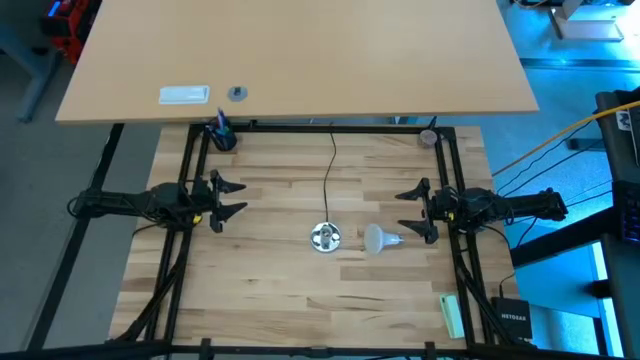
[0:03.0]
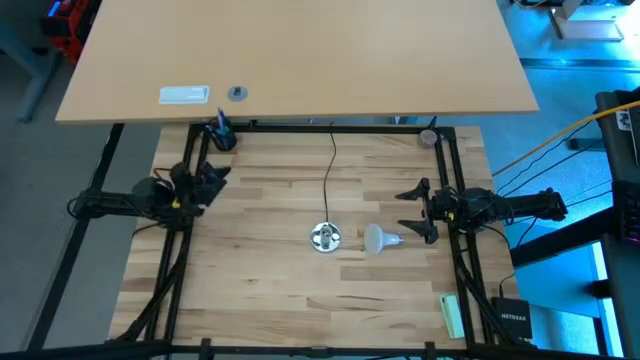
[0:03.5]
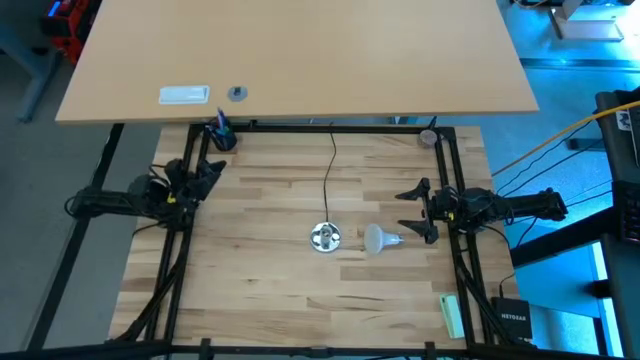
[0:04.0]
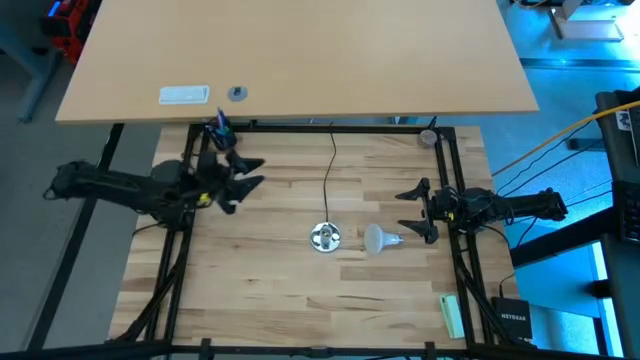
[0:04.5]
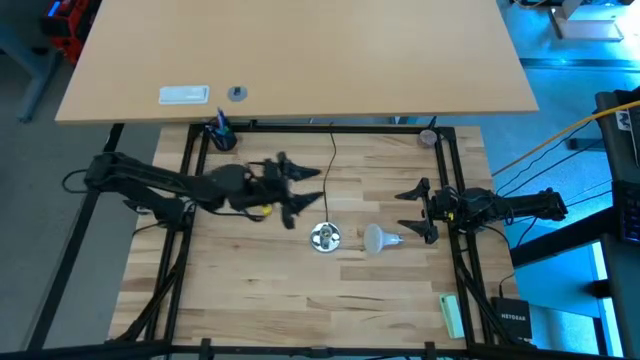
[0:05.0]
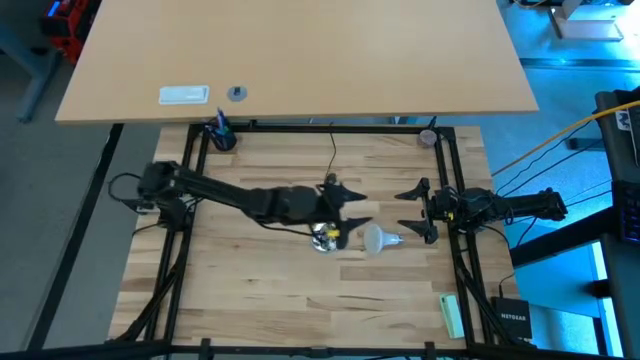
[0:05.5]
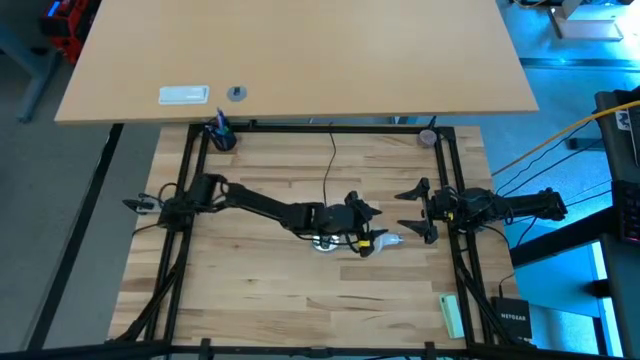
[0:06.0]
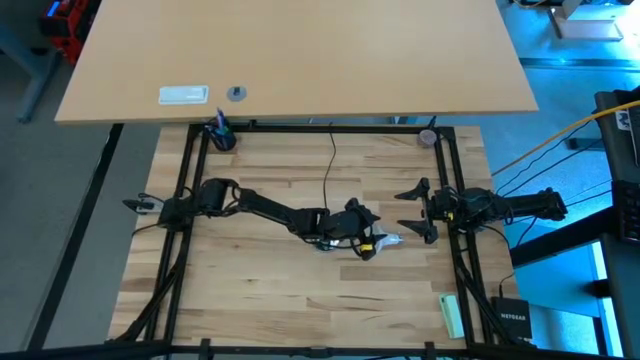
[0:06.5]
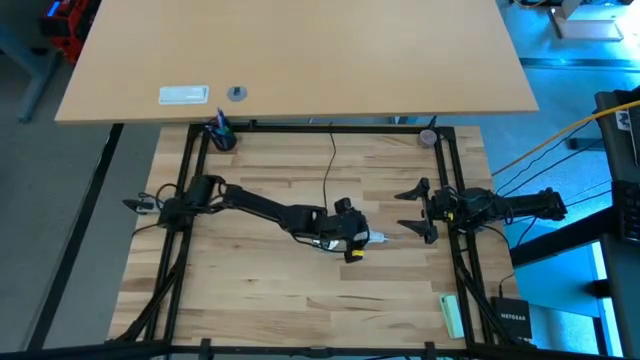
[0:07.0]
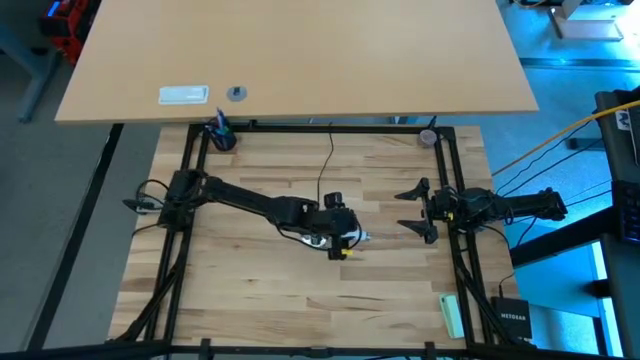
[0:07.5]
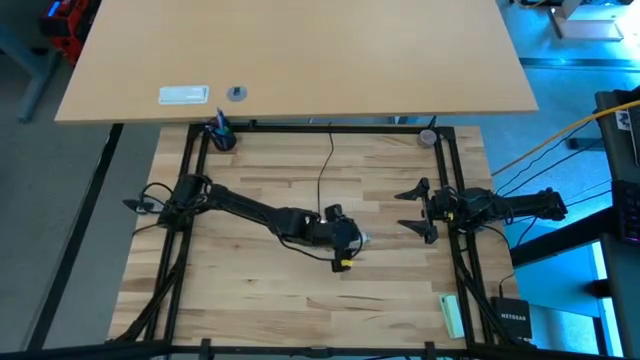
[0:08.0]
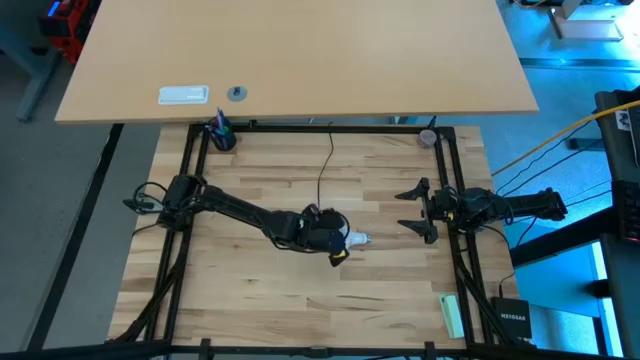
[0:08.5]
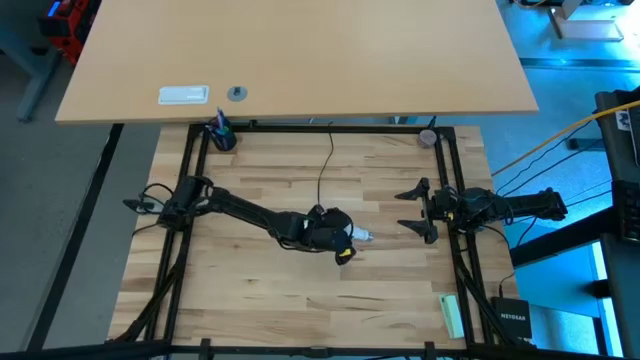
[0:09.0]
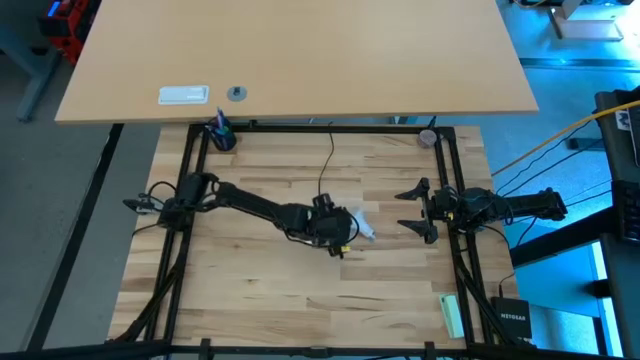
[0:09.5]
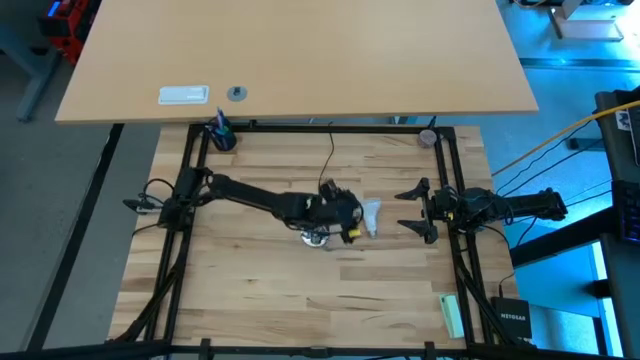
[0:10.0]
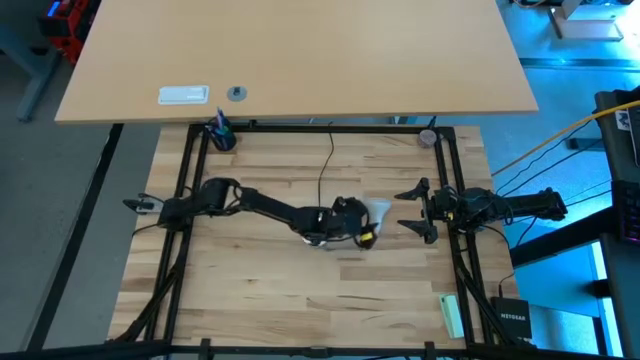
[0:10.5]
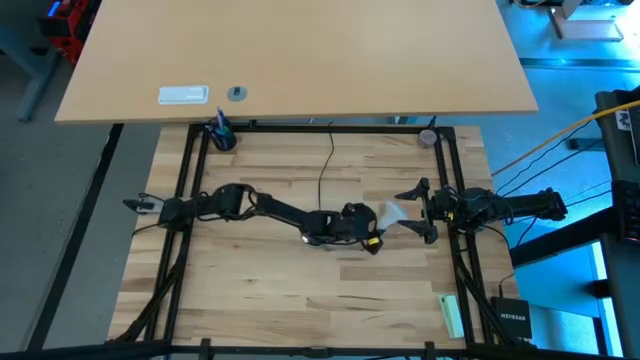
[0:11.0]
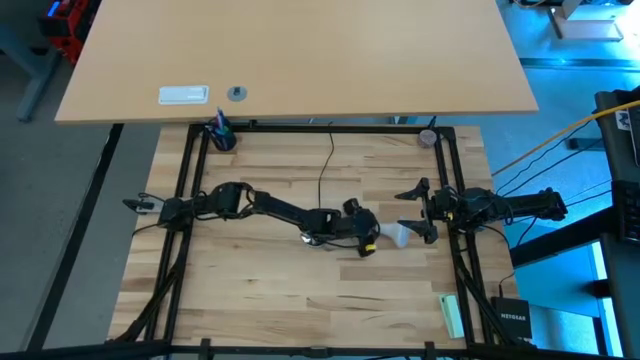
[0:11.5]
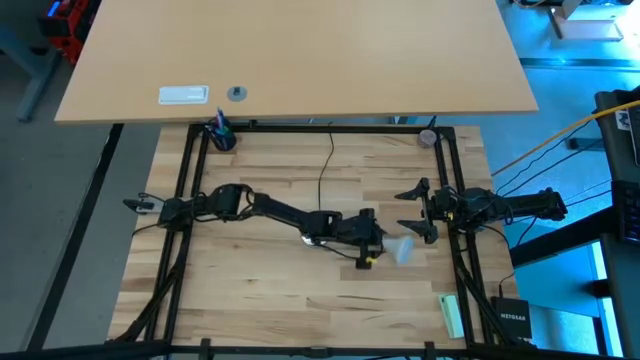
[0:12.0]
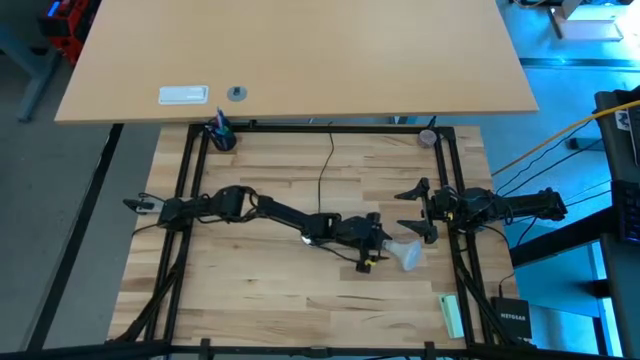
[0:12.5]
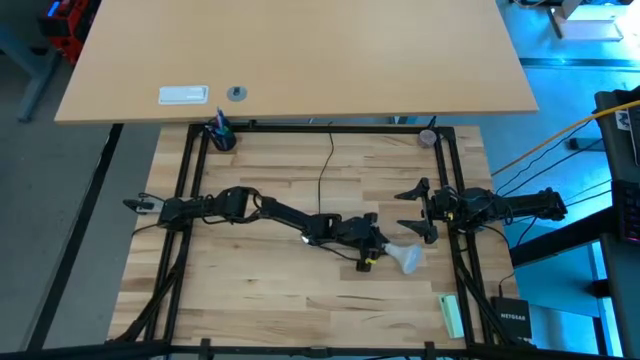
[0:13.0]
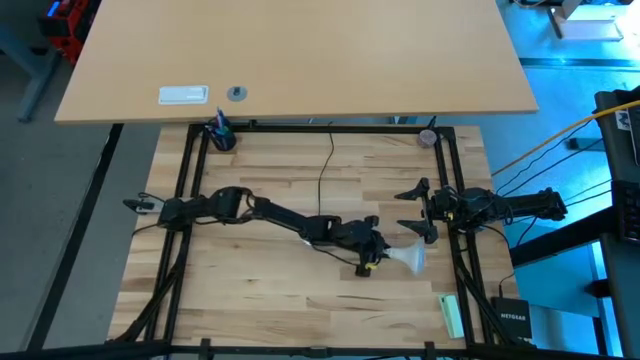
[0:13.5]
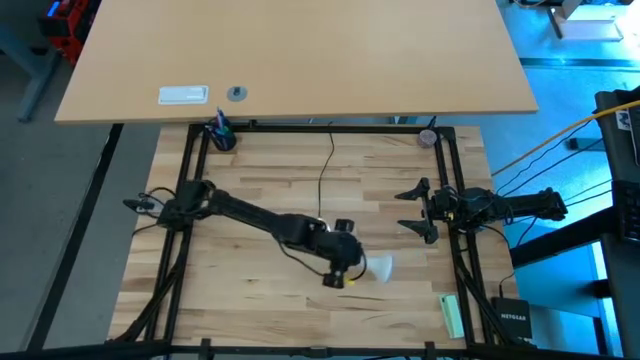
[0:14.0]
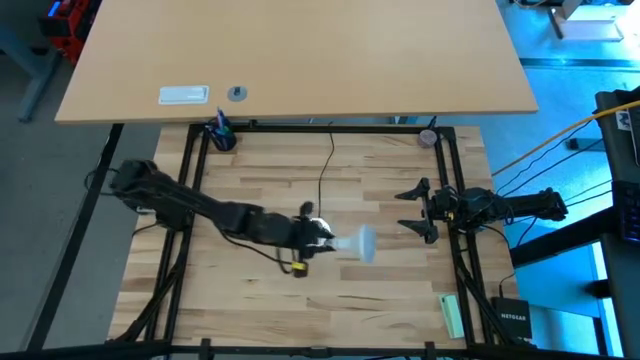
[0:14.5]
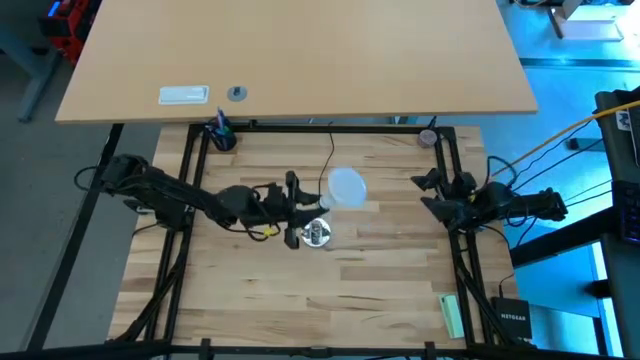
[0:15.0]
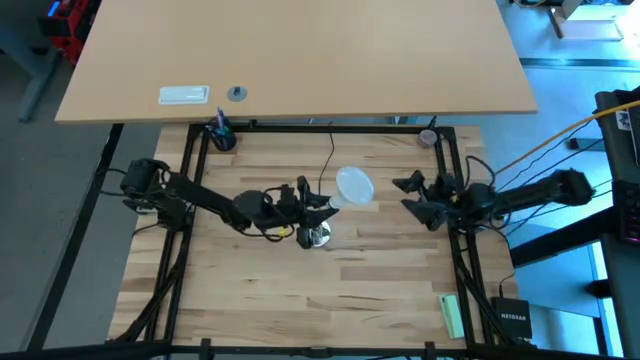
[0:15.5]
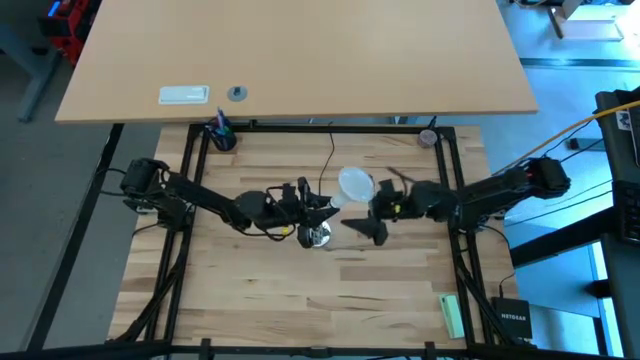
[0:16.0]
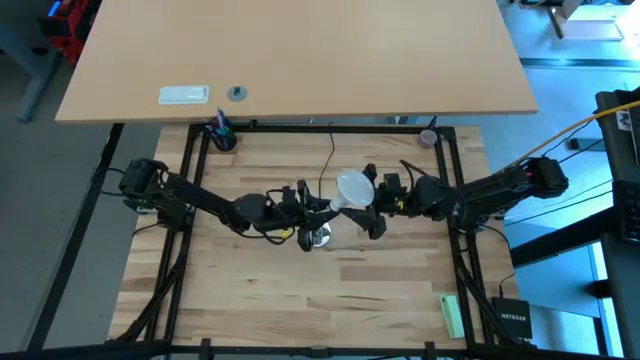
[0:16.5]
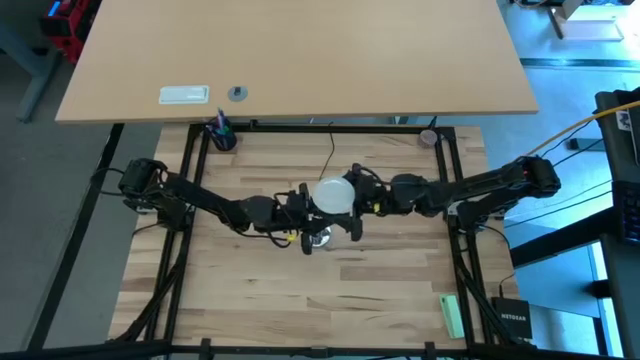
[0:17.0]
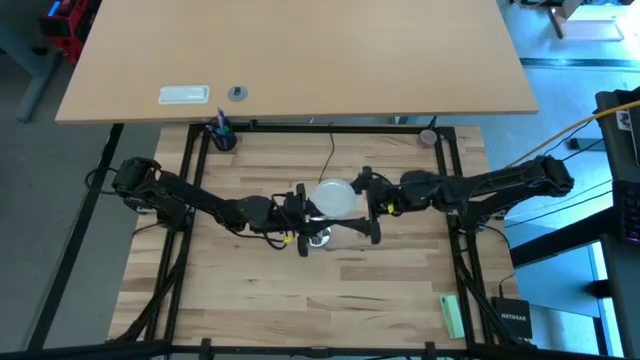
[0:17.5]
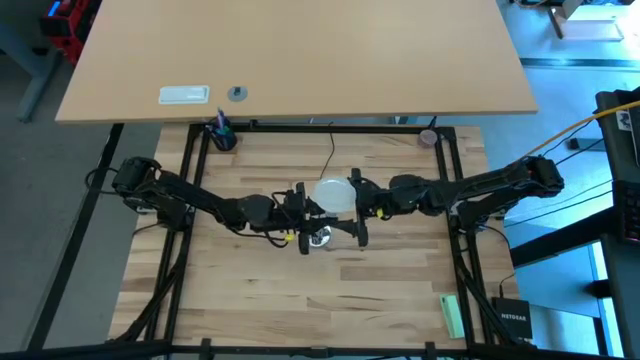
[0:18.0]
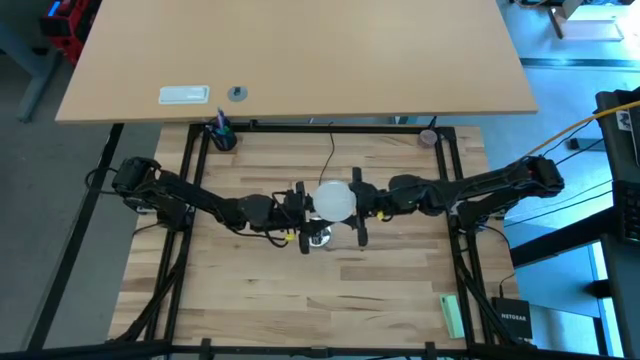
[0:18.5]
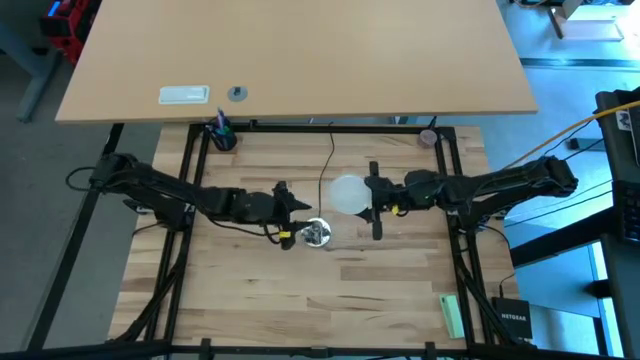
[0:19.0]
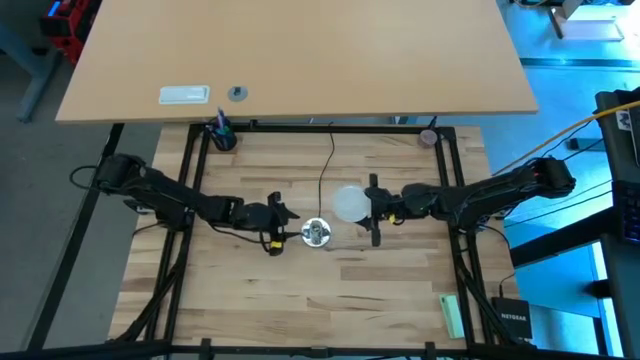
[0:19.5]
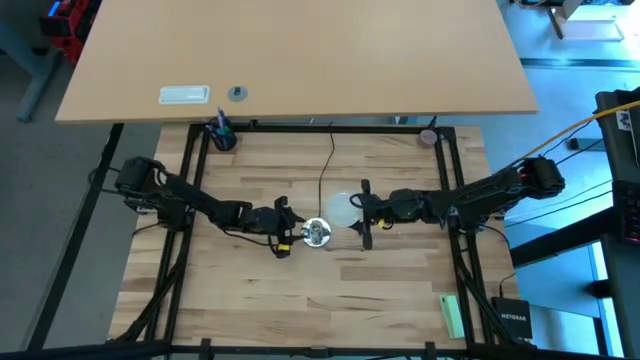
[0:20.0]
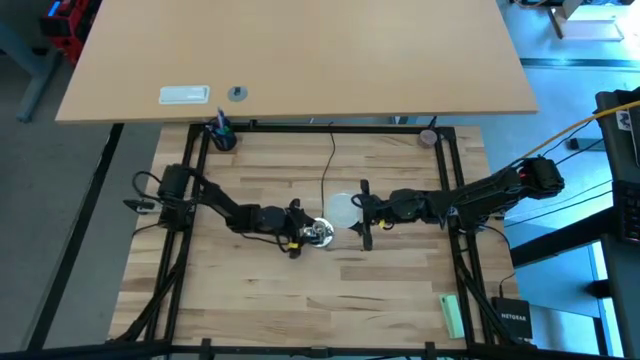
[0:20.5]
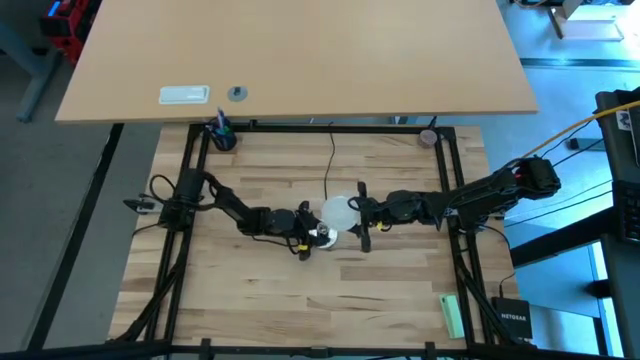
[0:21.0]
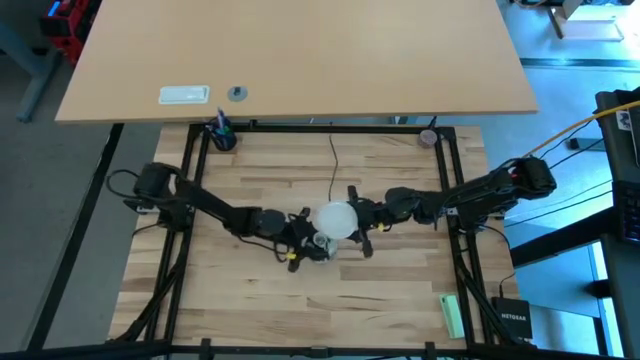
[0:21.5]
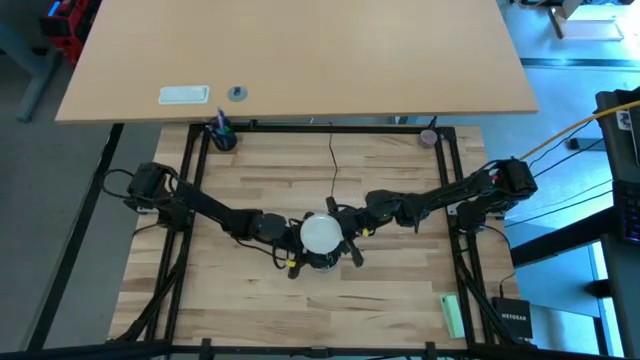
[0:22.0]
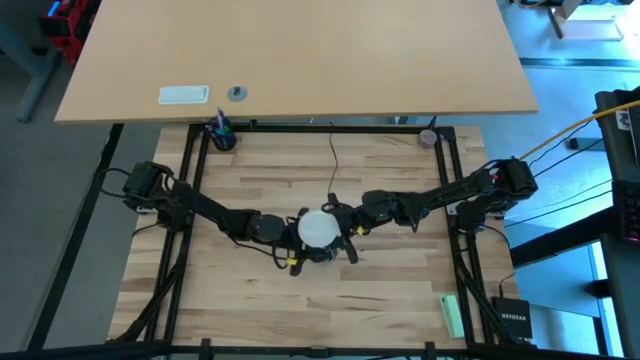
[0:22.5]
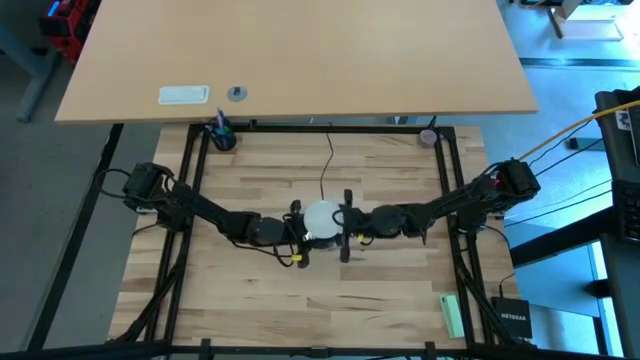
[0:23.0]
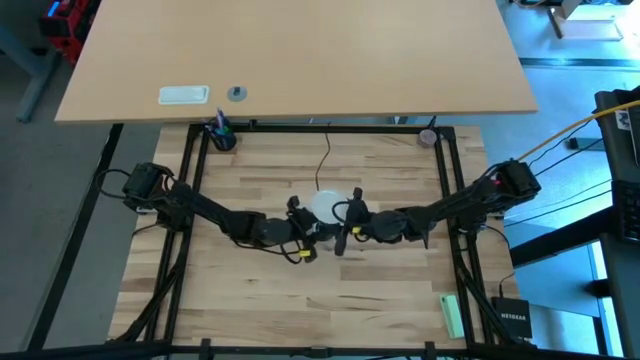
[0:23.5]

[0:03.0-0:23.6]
Task: Screw lightbulb
Insert the lightbulb into the lamp
